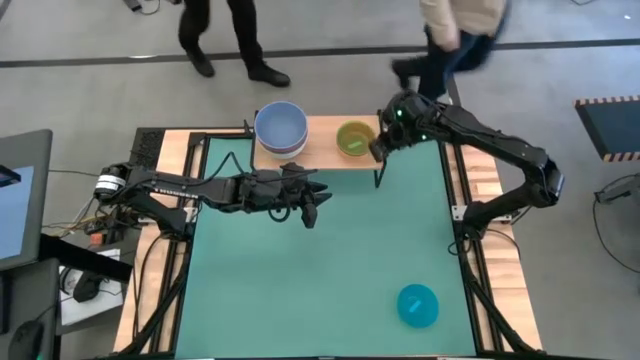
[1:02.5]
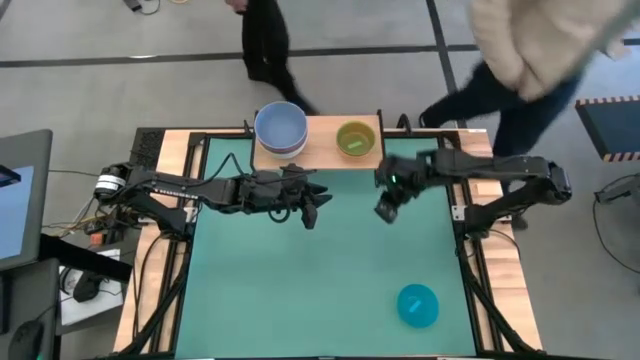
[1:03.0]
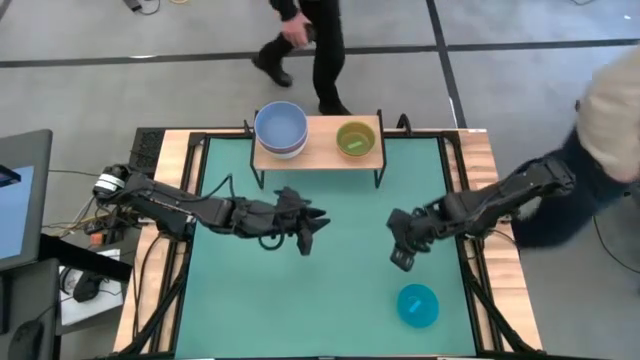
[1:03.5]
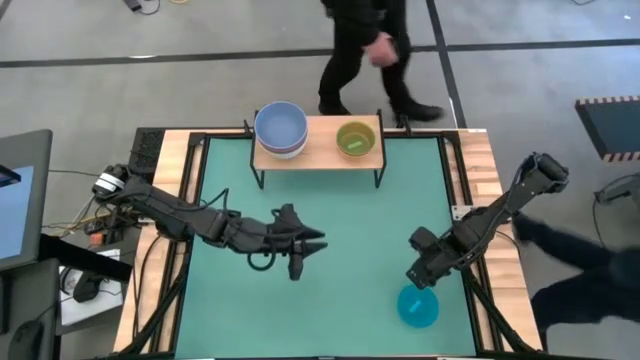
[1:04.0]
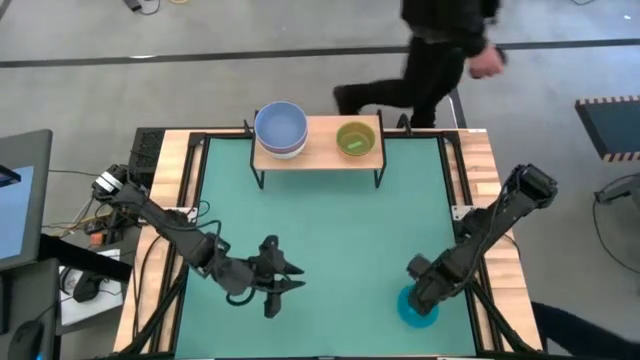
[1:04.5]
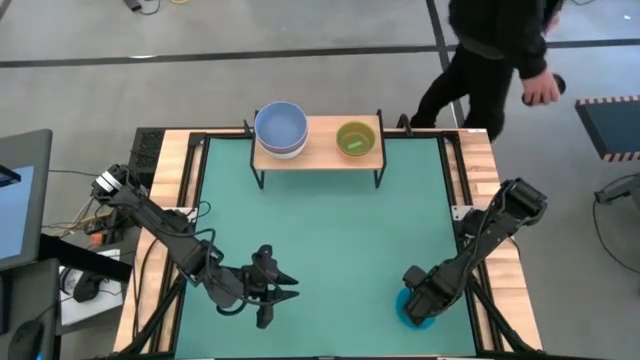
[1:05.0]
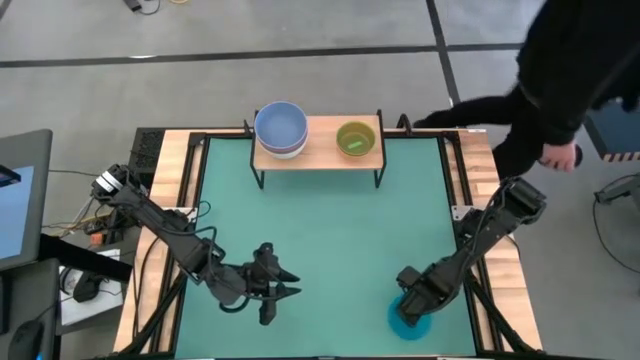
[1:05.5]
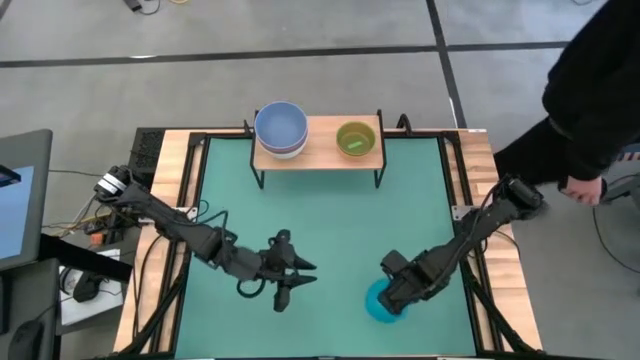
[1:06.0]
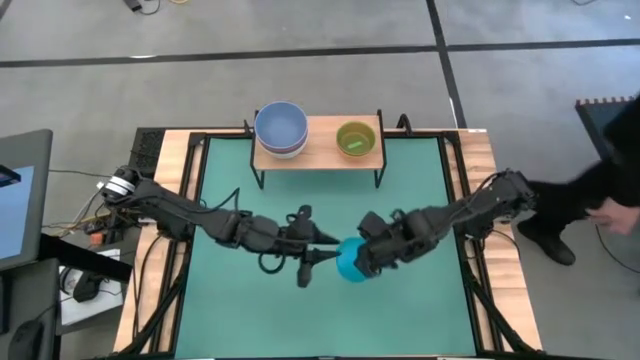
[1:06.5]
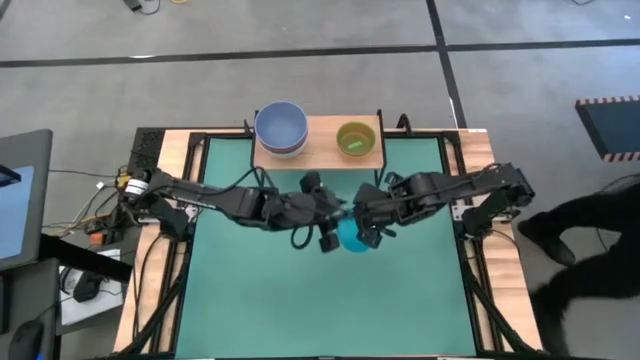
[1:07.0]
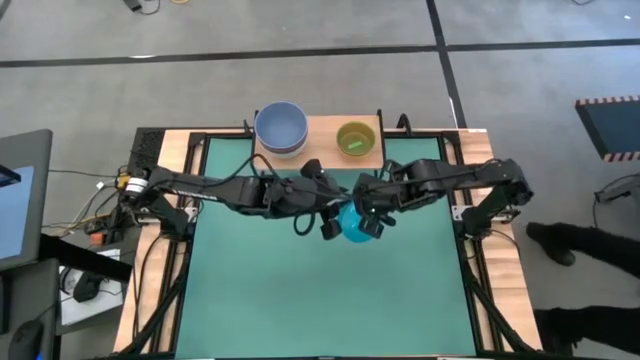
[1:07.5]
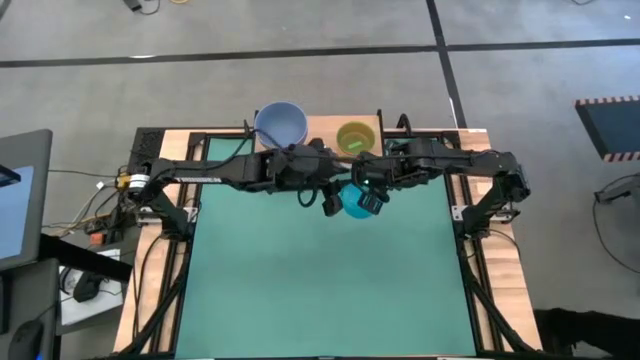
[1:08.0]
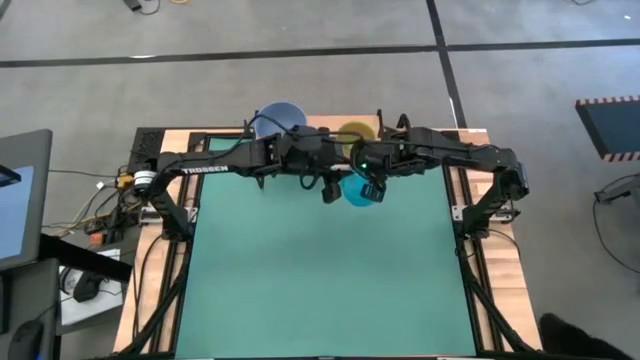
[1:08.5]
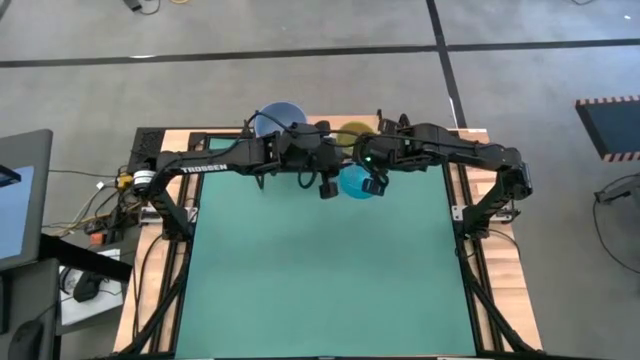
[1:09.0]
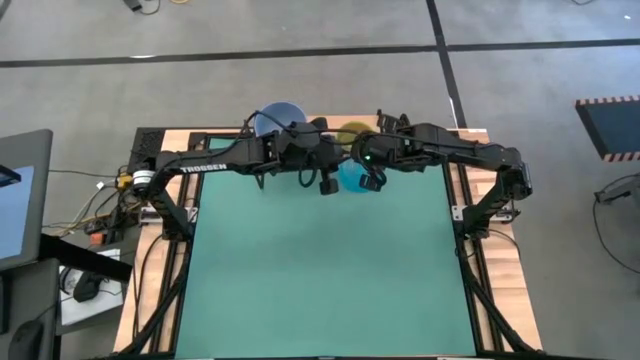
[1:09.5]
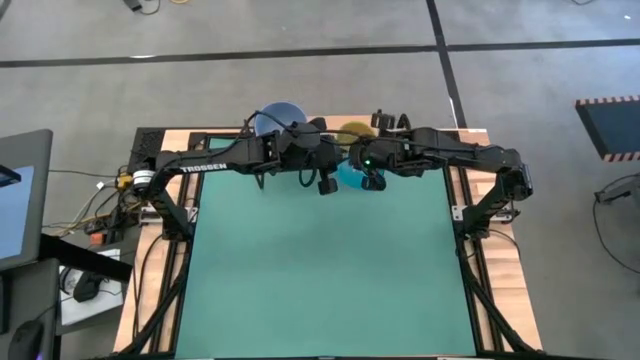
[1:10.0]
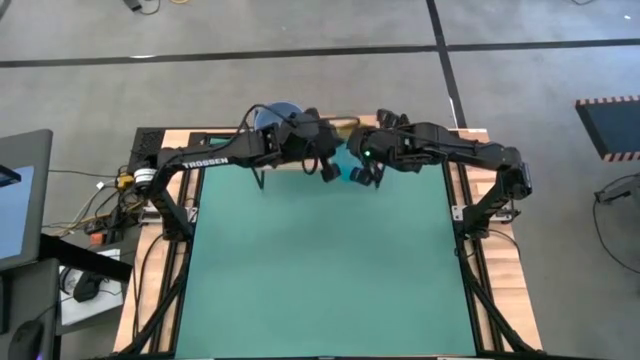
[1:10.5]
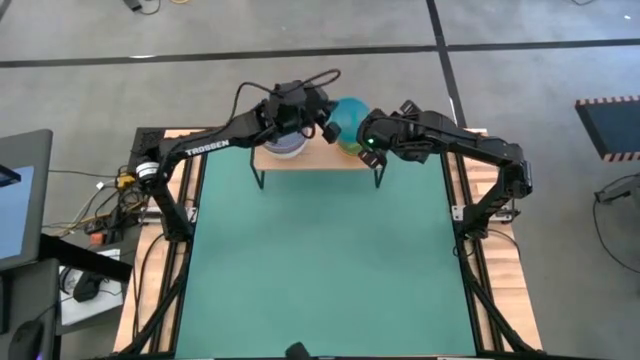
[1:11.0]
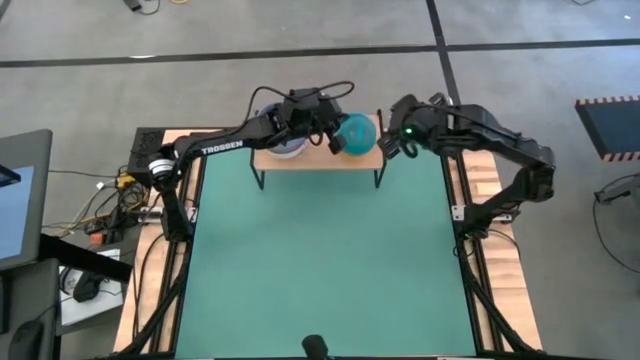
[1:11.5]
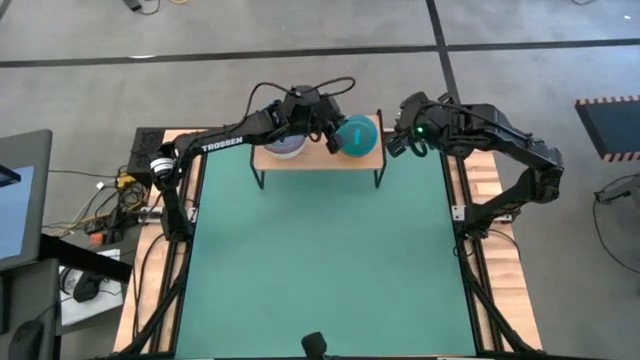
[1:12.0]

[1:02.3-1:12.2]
Task: Place and stack bowls onto a shelf
Stack the small blue bowl on the small light green bowl on the shelf

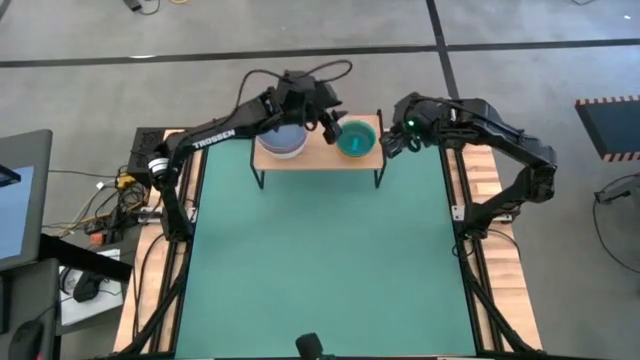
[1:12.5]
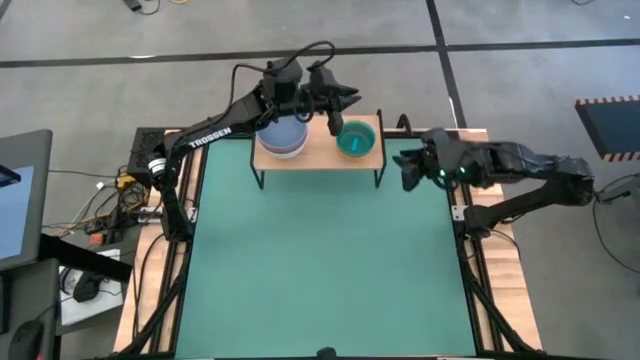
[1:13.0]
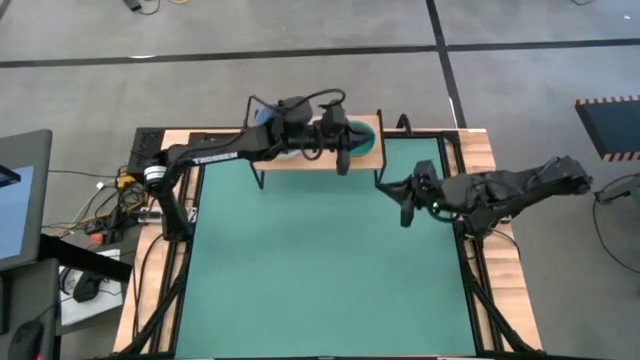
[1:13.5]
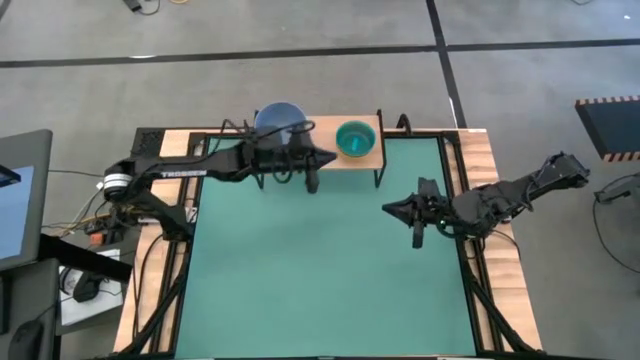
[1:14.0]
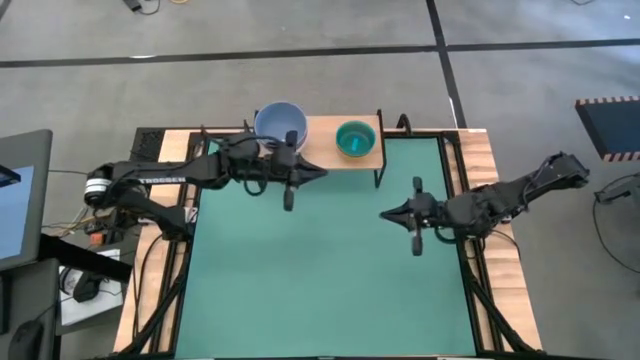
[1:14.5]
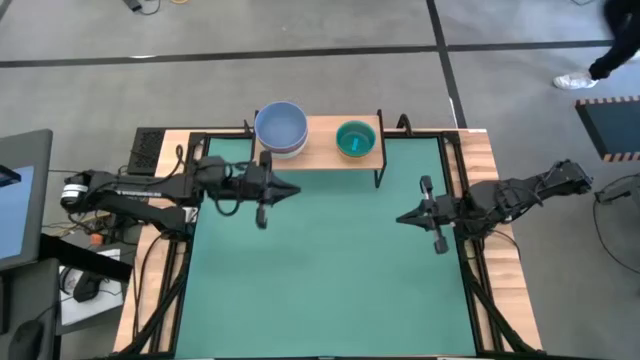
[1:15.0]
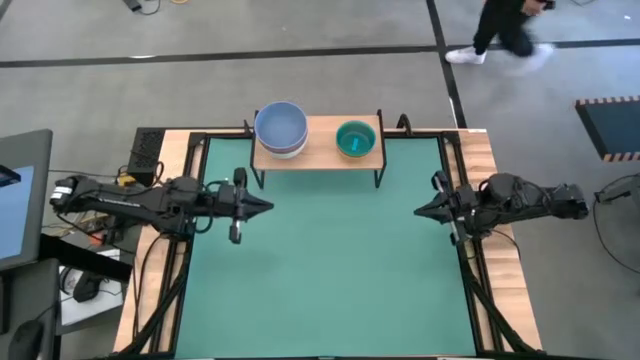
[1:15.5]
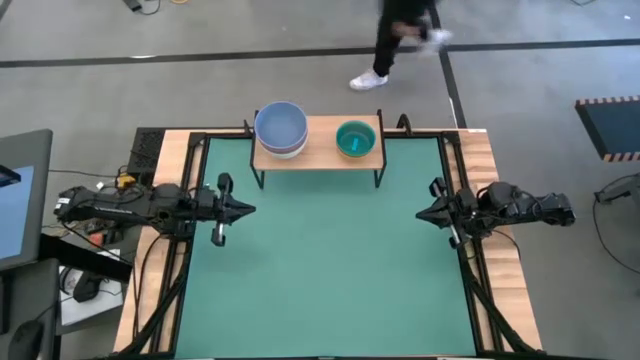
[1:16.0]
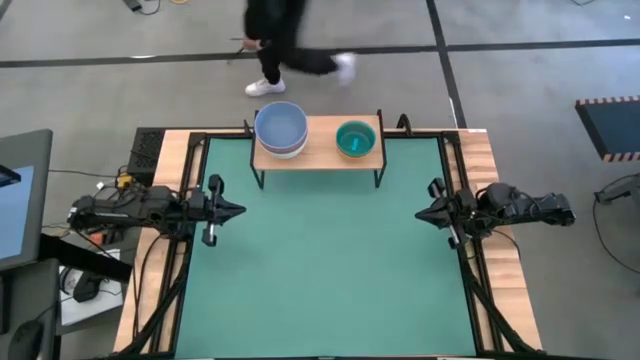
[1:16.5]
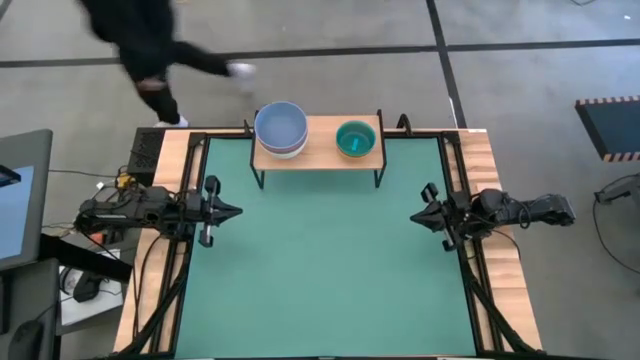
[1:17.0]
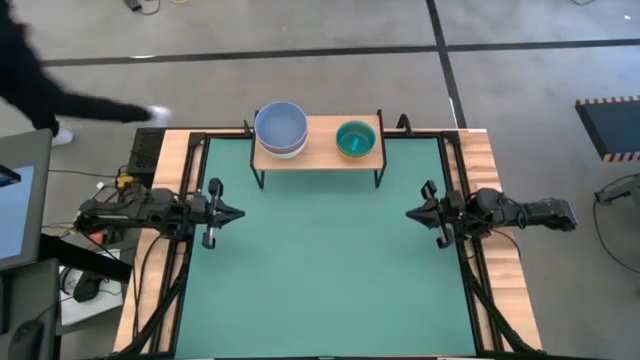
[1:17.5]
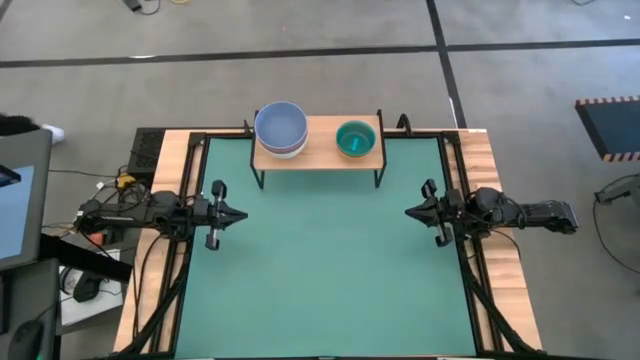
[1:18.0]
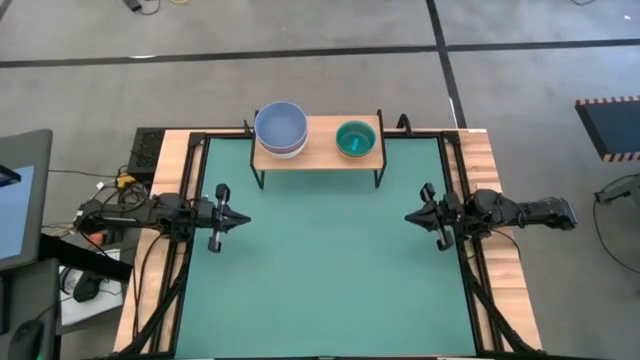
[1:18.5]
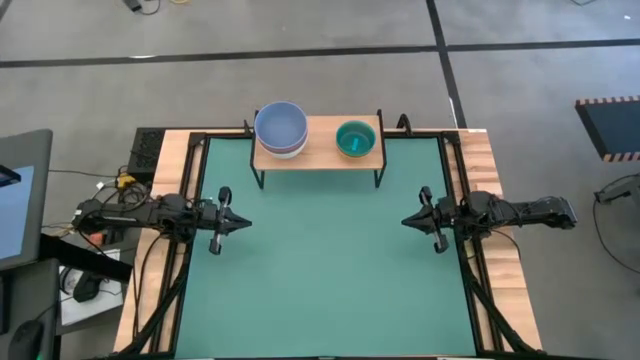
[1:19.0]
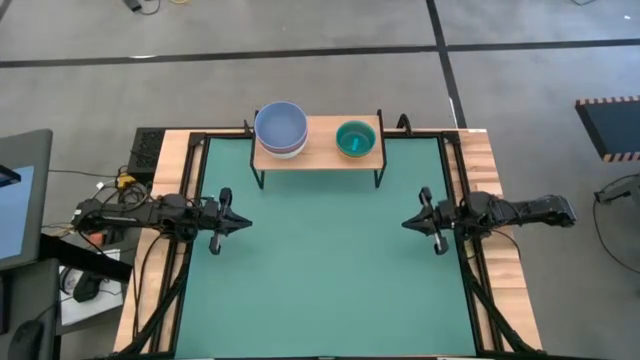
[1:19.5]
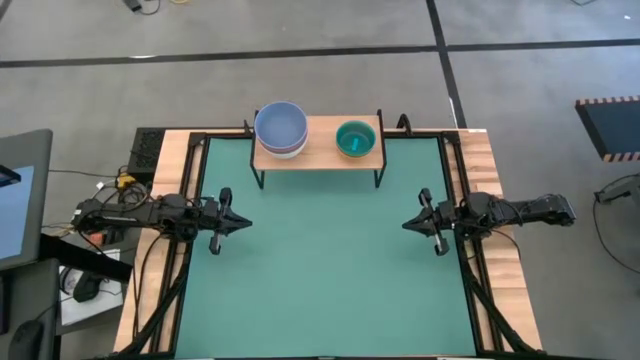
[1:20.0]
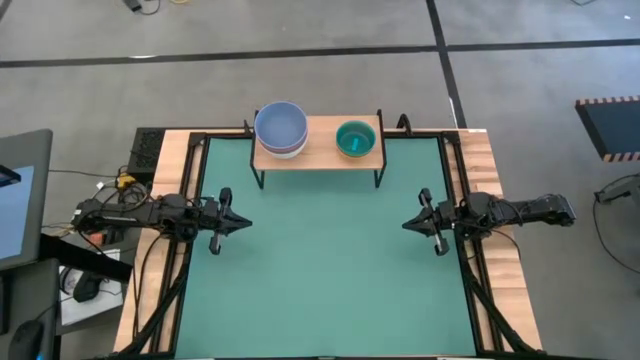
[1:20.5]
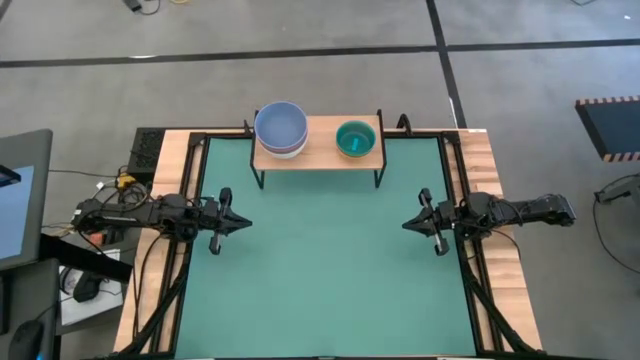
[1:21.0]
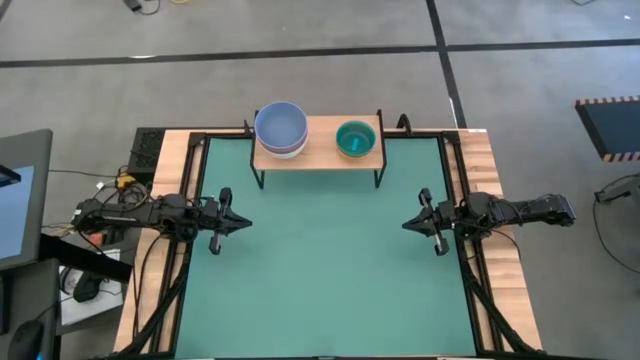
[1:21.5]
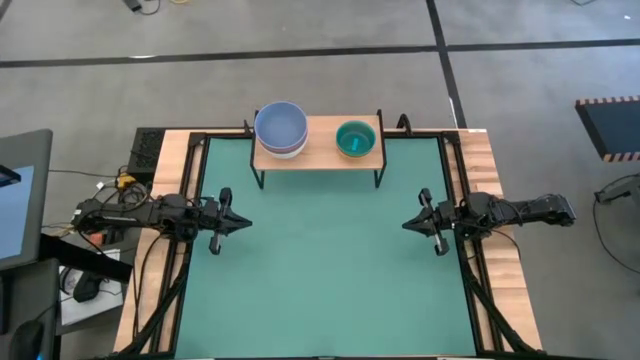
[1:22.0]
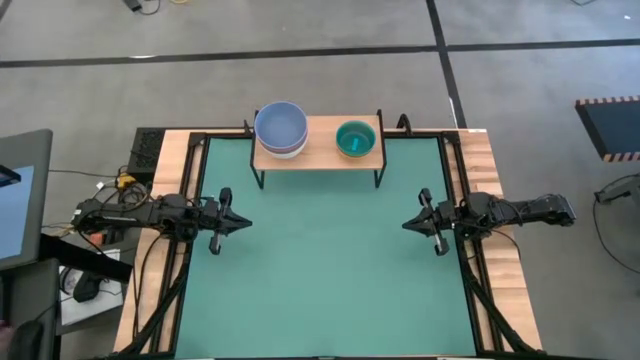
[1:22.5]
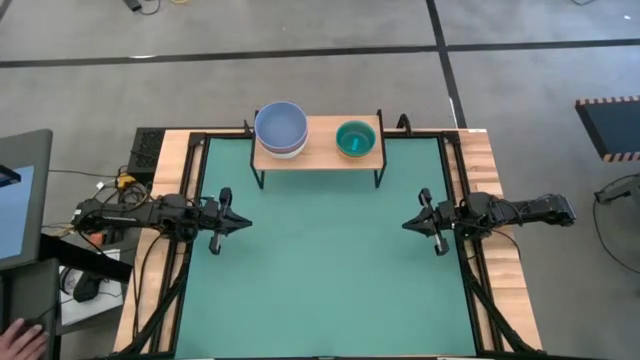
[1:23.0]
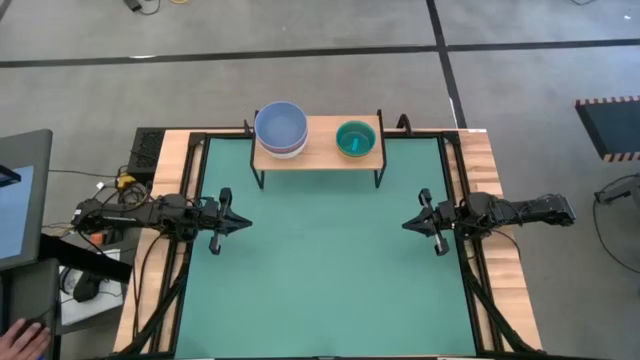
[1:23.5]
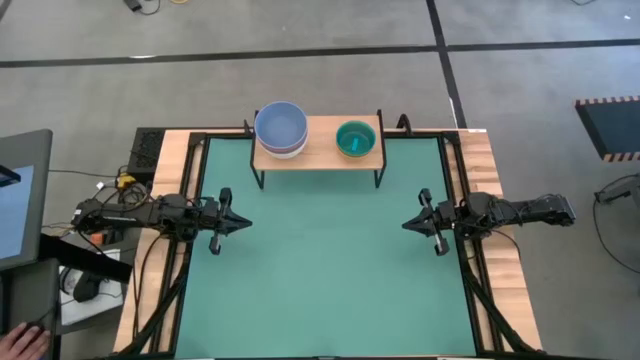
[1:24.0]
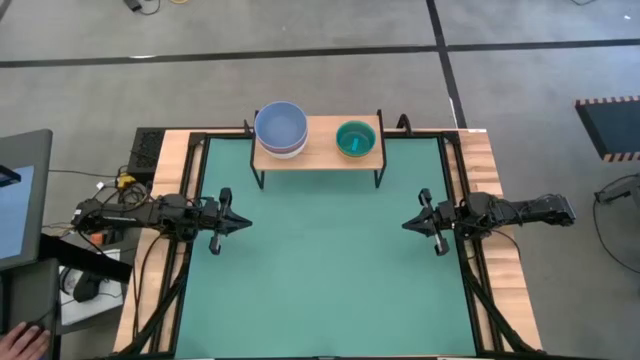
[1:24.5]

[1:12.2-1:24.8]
Return to Home Position
